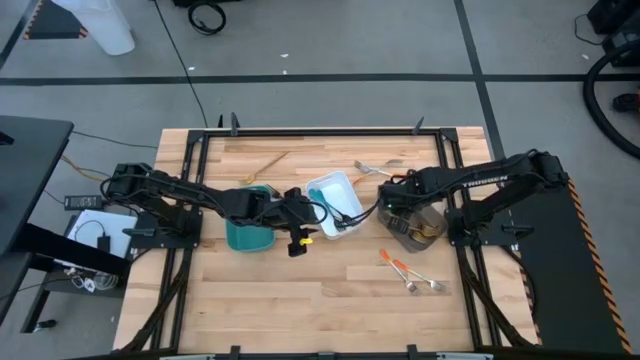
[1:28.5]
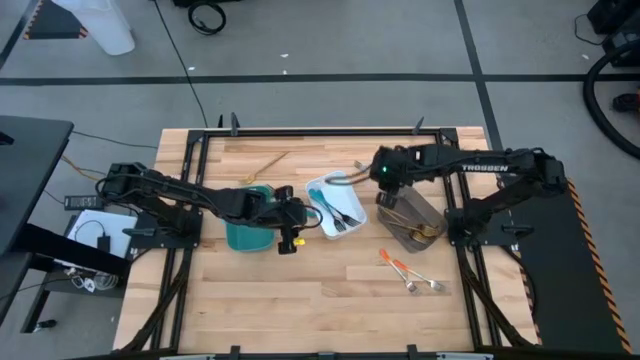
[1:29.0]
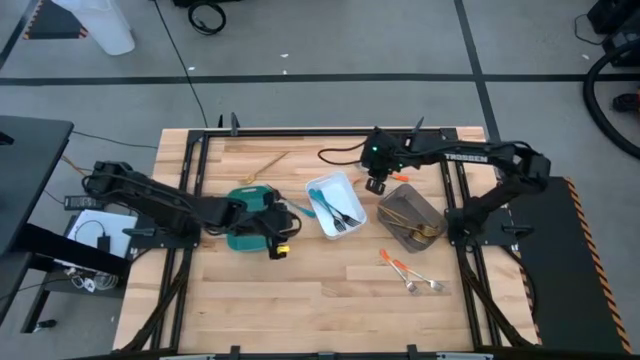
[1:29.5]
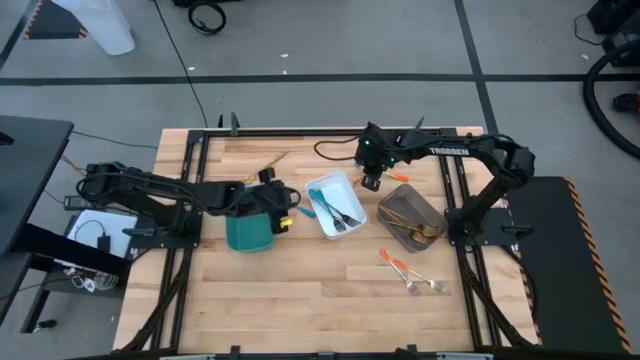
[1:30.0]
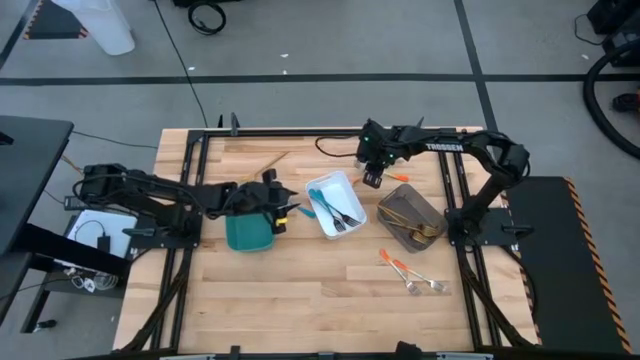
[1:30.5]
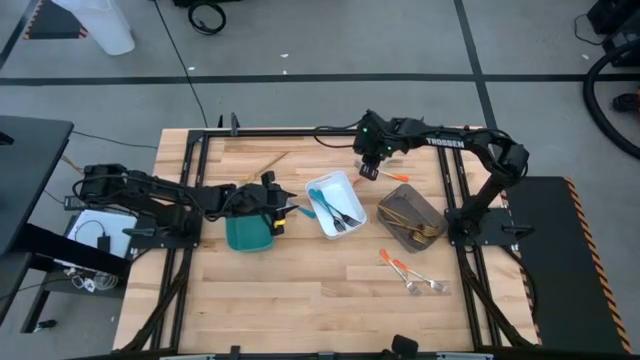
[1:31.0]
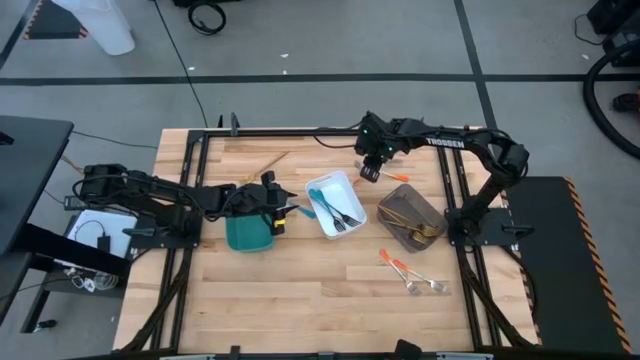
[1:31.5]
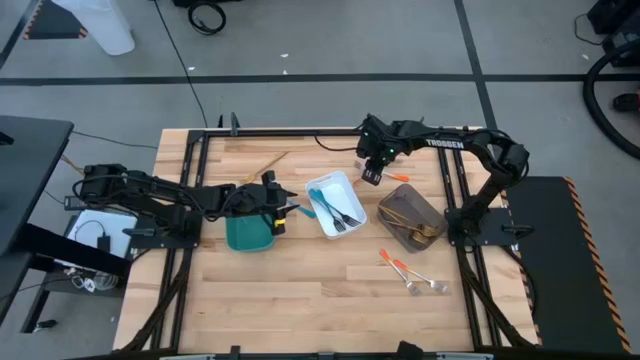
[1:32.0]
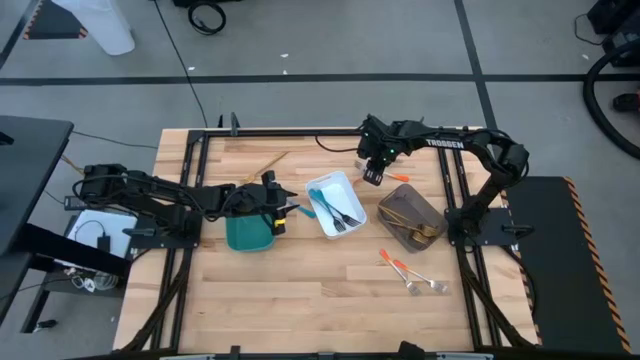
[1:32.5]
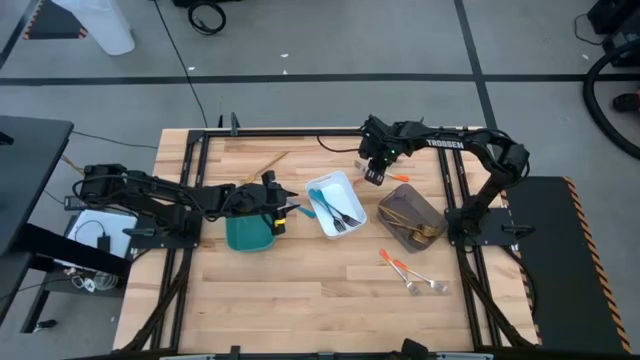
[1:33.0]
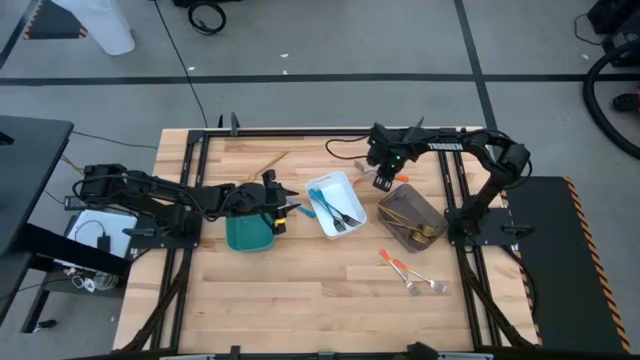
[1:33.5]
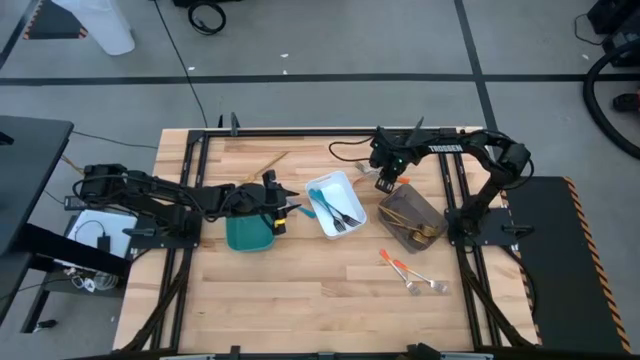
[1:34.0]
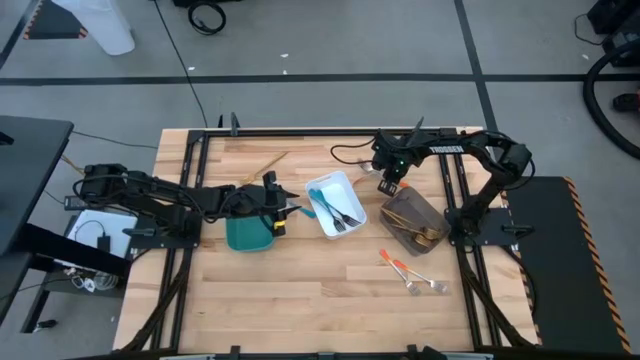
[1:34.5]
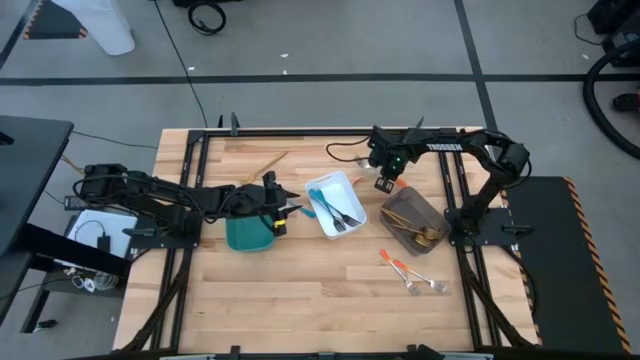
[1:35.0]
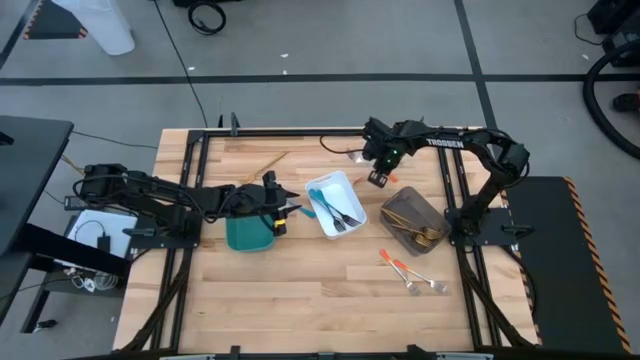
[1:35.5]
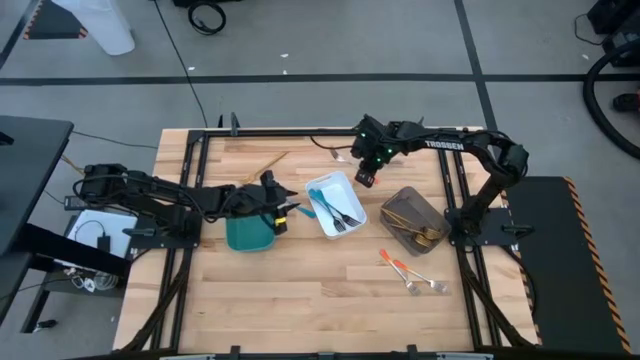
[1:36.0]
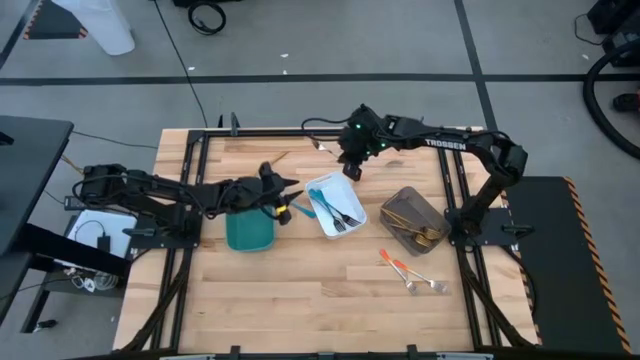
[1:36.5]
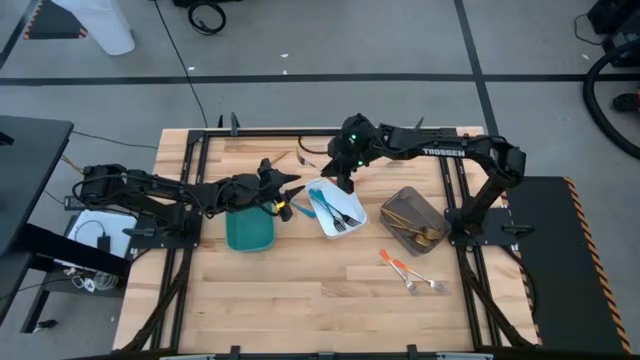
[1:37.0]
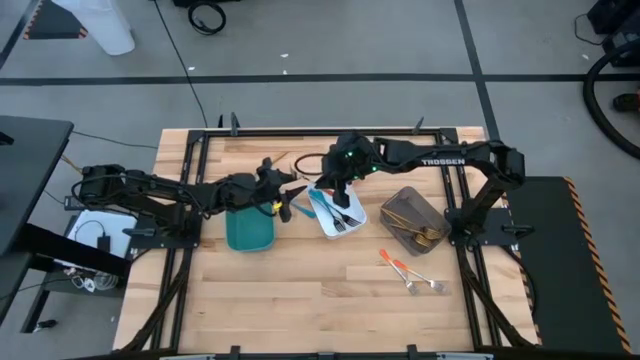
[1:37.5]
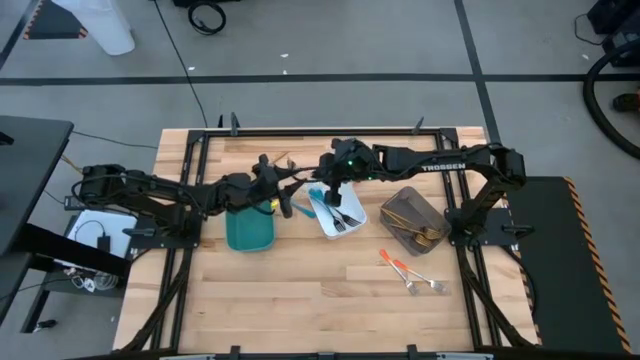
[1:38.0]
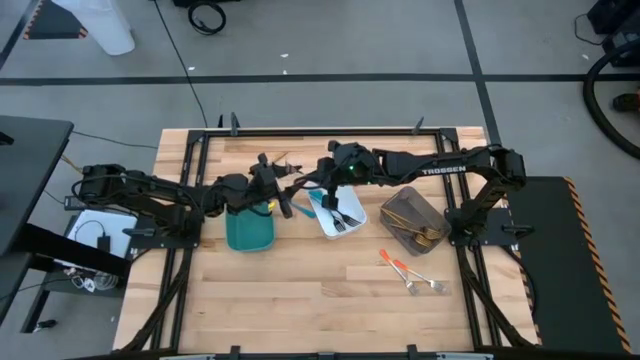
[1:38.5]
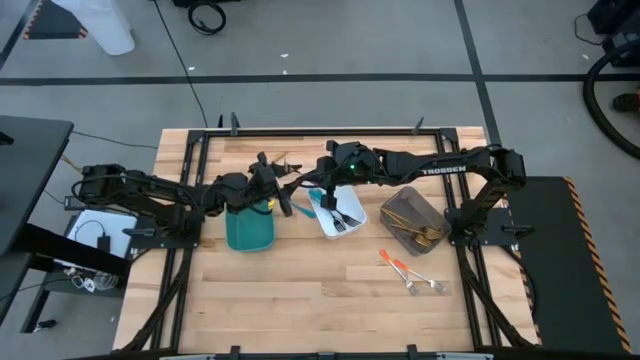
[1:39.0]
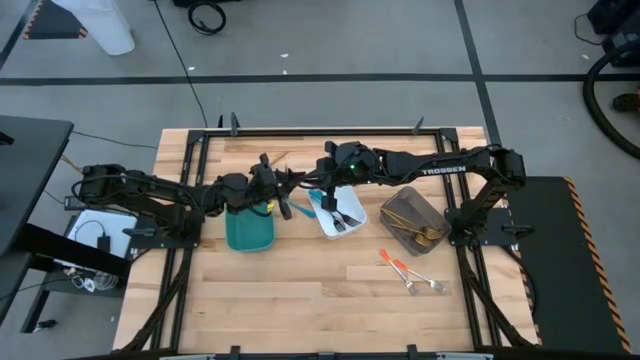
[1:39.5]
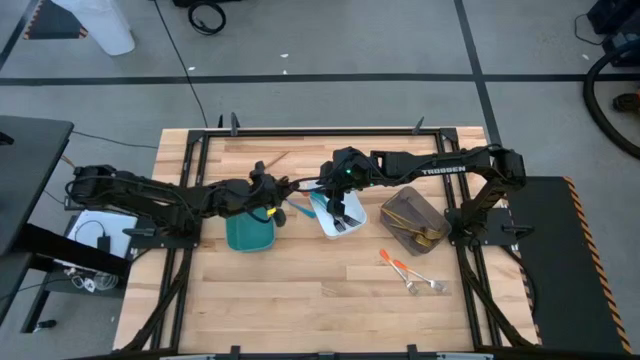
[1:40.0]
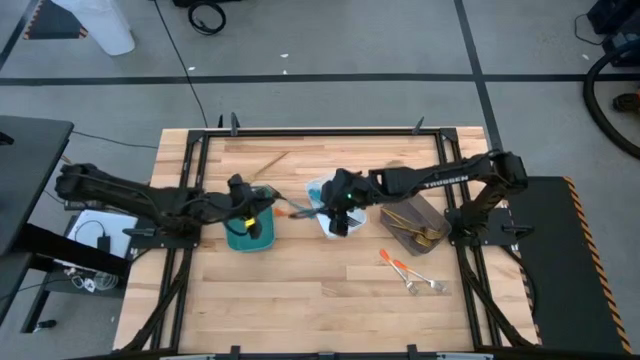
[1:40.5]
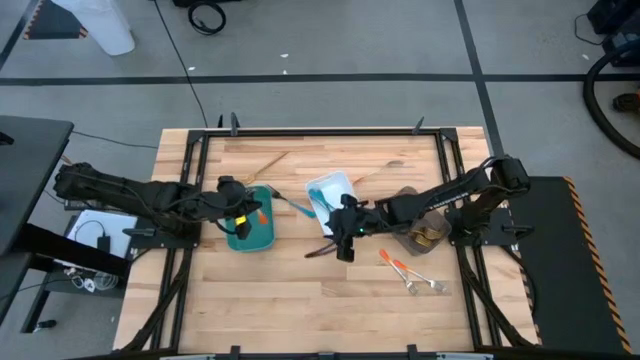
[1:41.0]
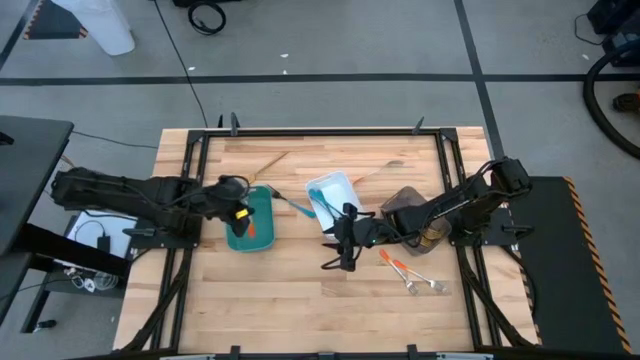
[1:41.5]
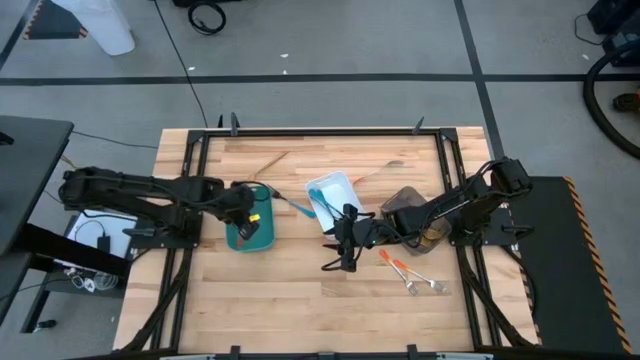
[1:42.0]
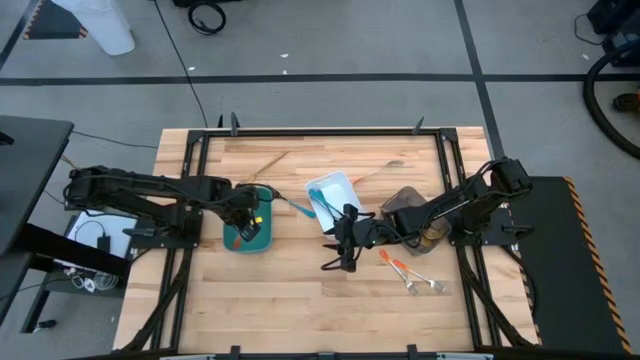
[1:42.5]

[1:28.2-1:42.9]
Task: Sort silverware by color (type)
Put the orange fork into the green bin

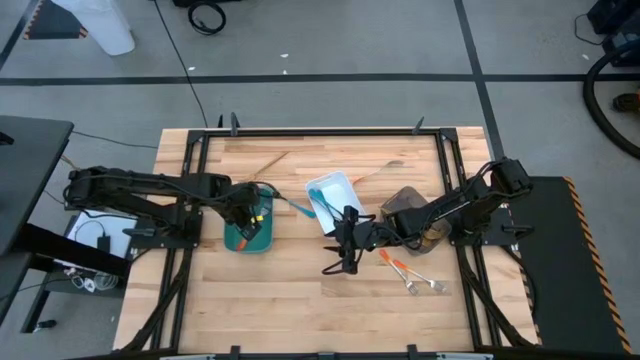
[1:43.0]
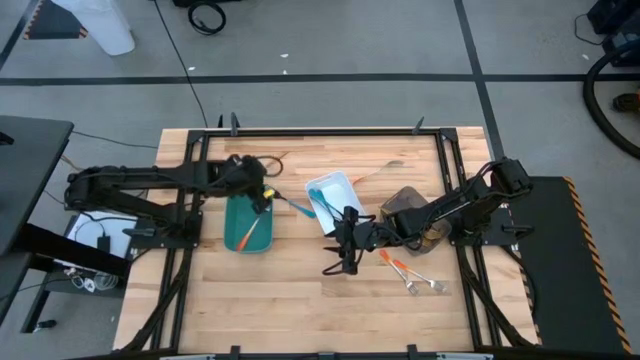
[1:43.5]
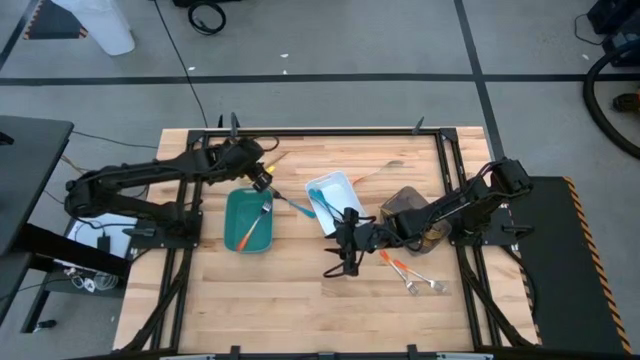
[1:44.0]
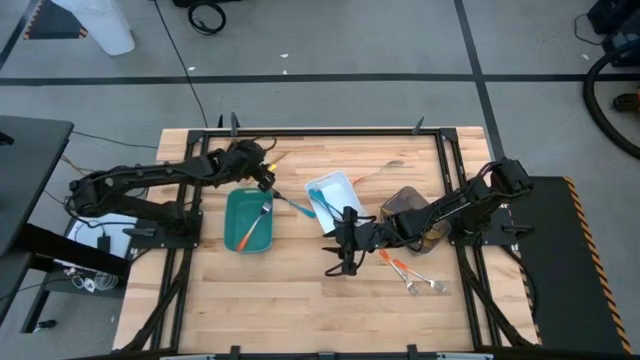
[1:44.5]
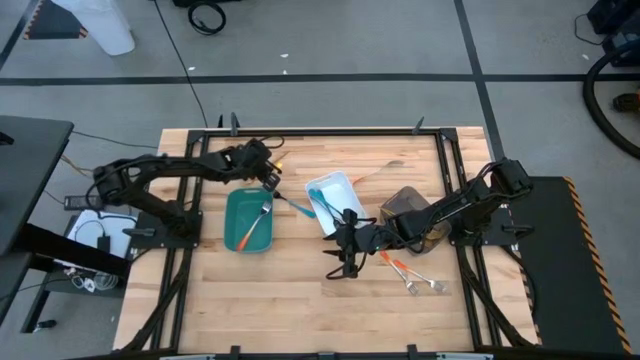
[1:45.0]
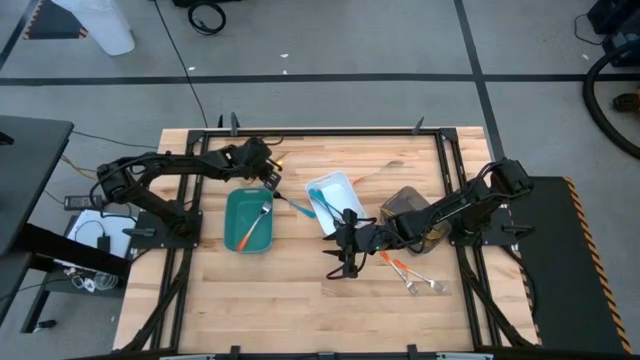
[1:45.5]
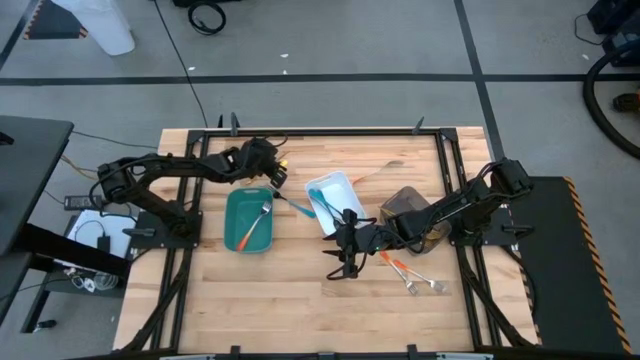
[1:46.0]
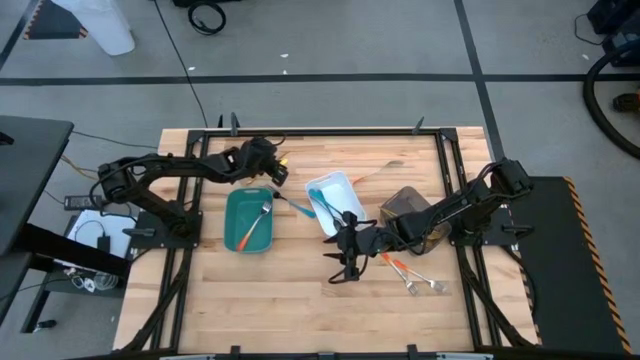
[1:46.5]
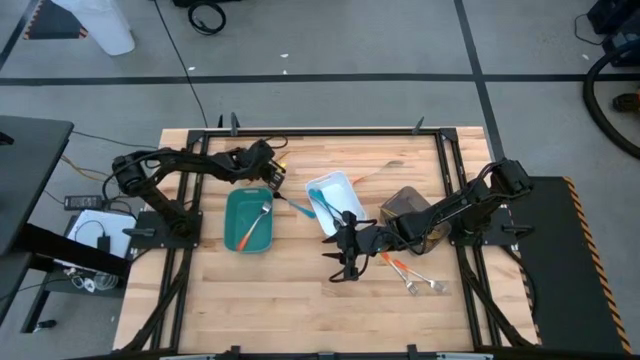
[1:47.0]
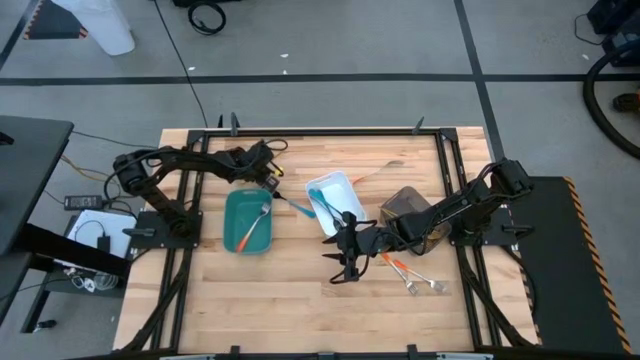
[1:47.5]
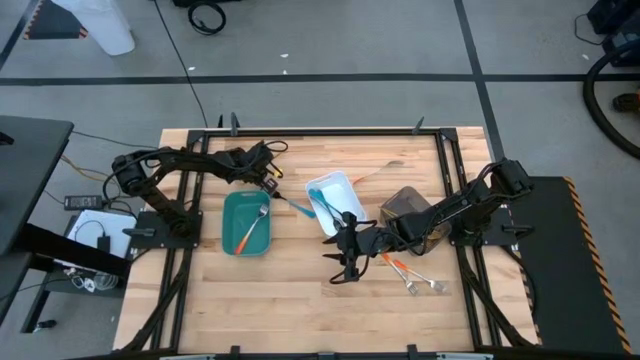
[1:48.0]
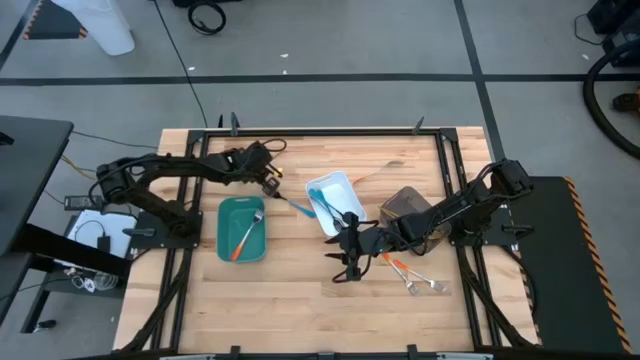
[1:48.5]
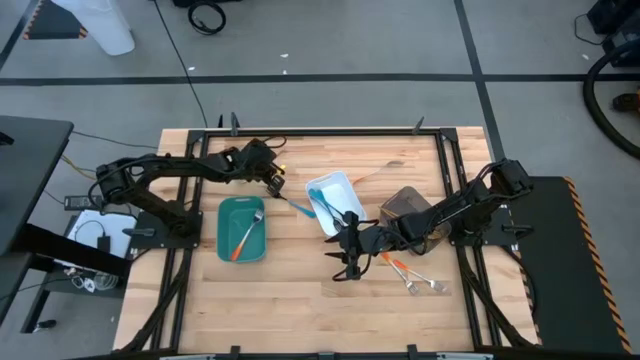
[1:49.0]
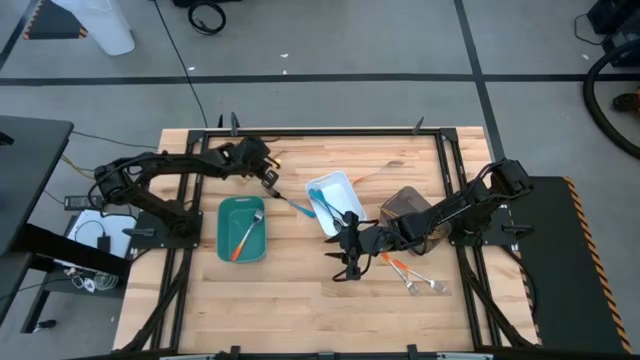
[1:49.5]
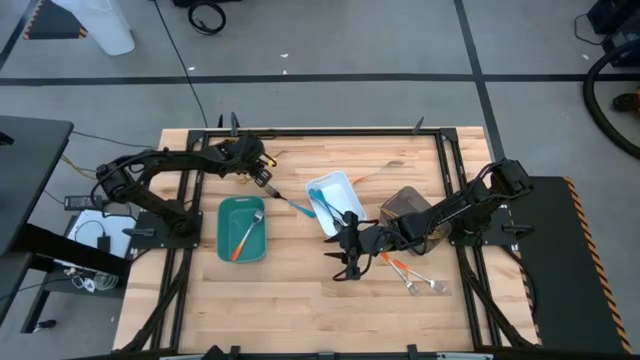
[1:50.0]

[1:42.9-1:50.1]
Put the gold fork into the black bin
